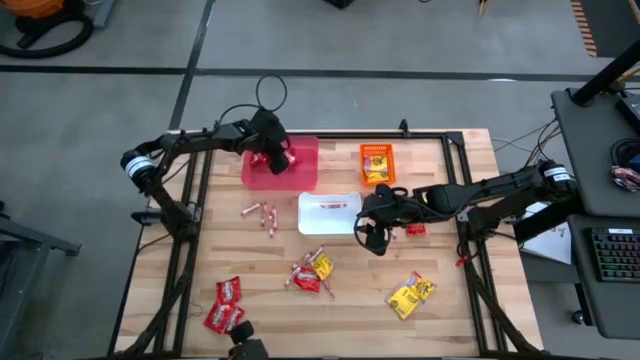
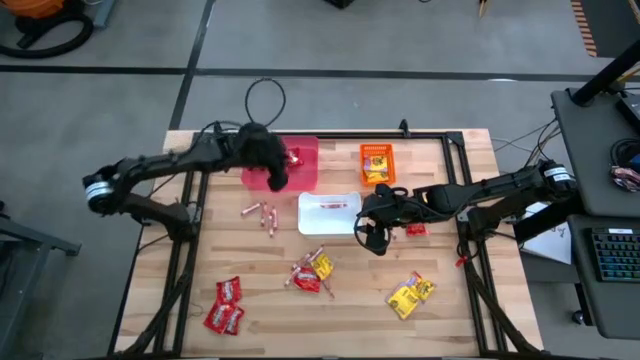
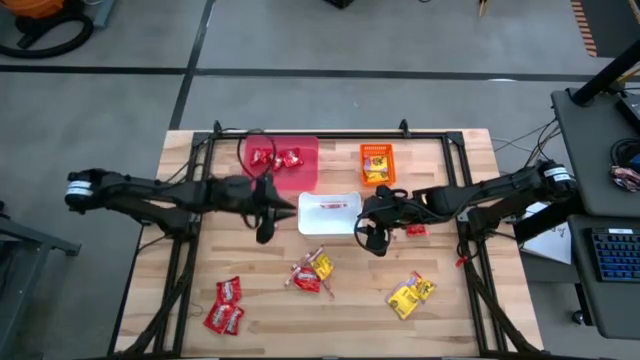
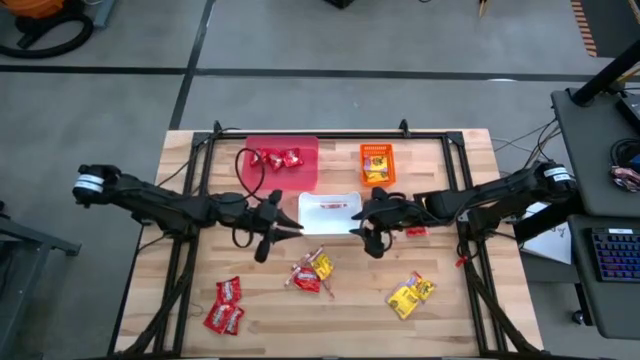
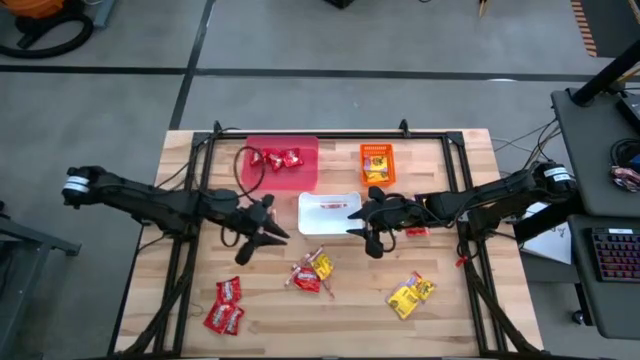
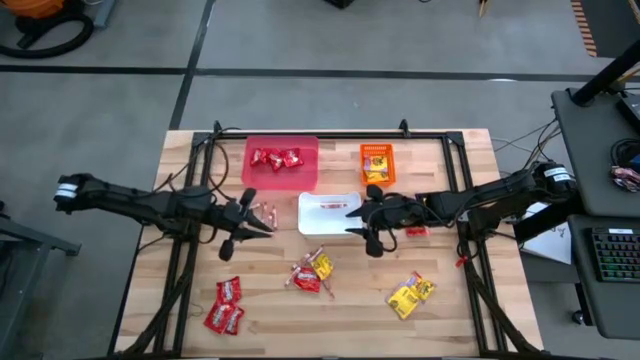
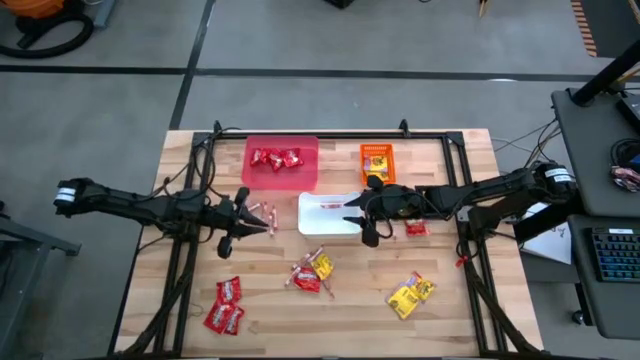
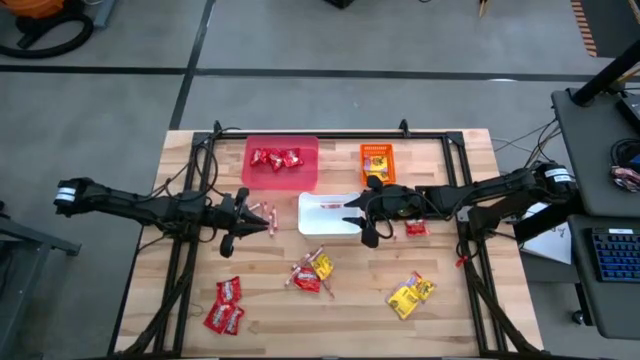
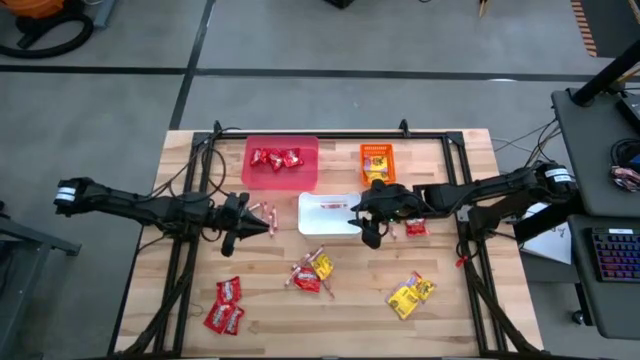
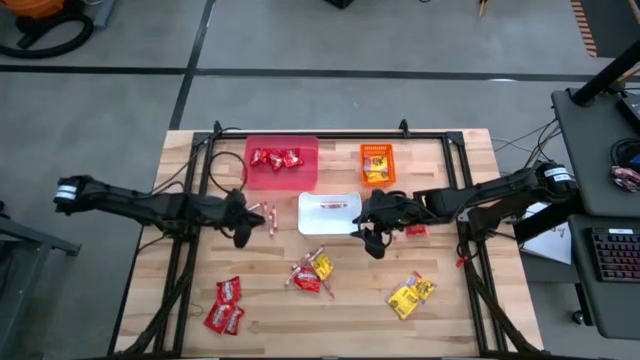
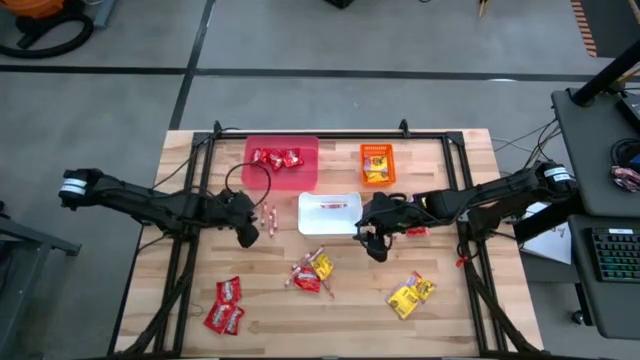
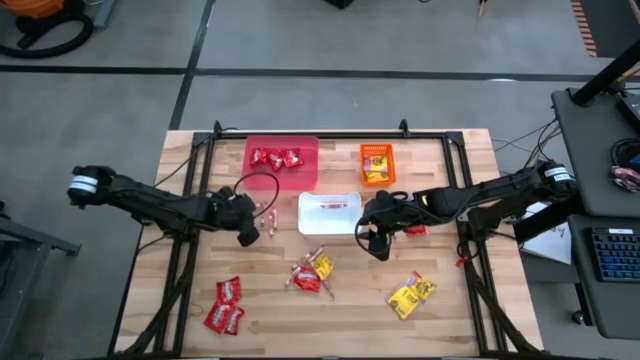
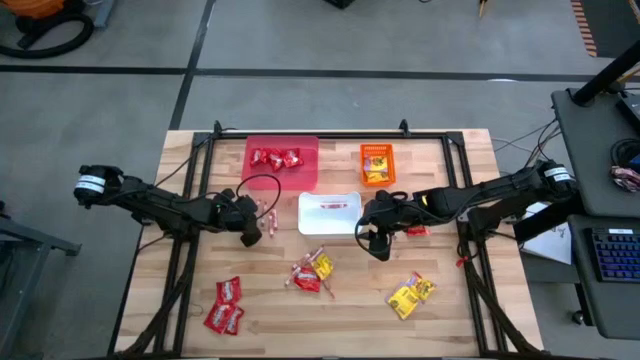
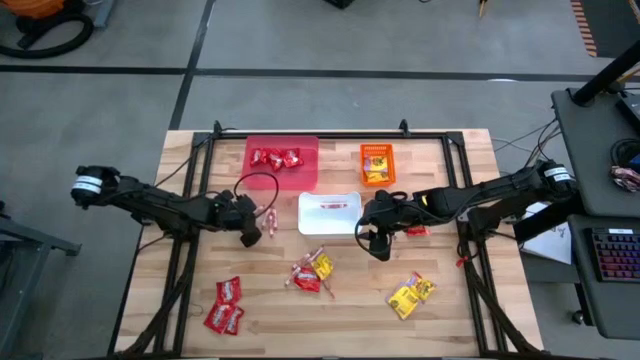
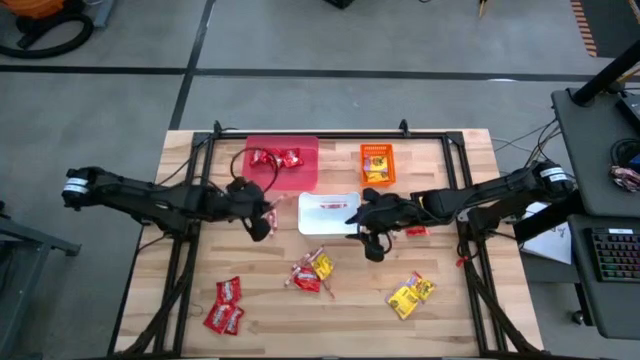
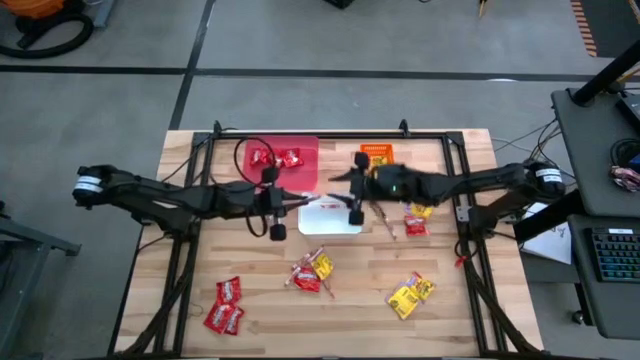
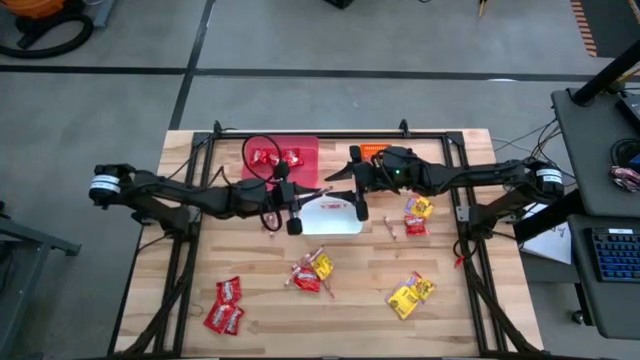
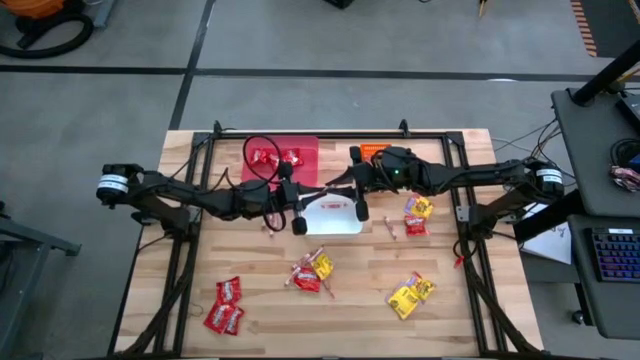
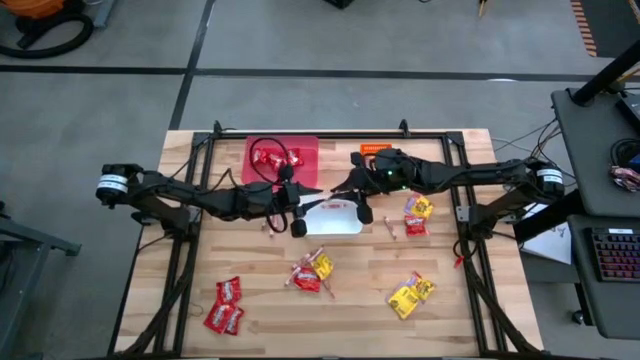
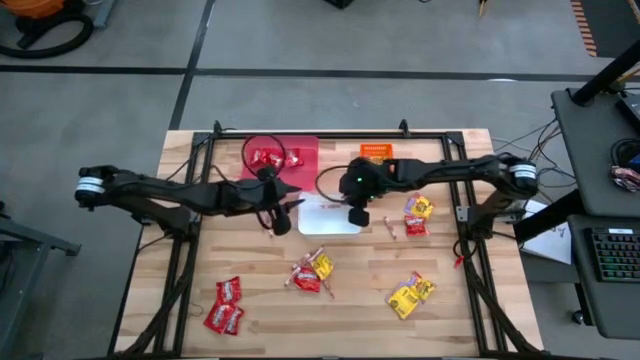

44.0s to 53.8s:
Task: Sort candy
Put the white candy into the white bin

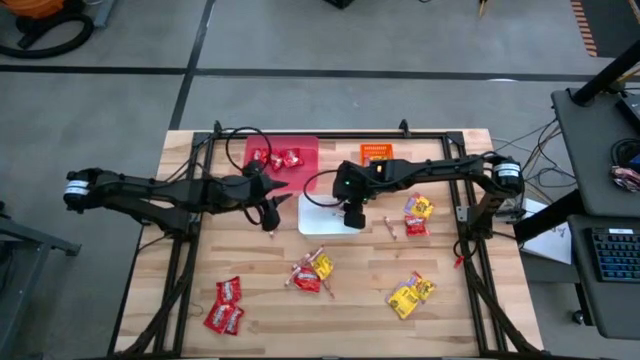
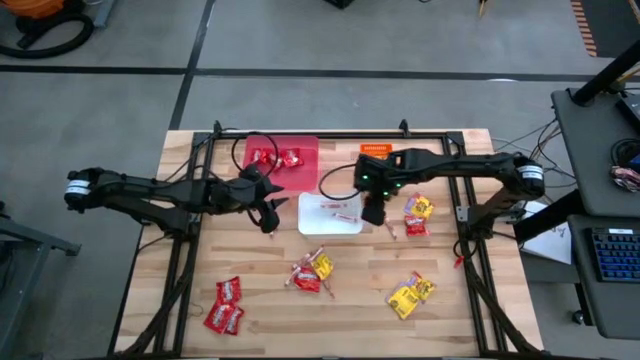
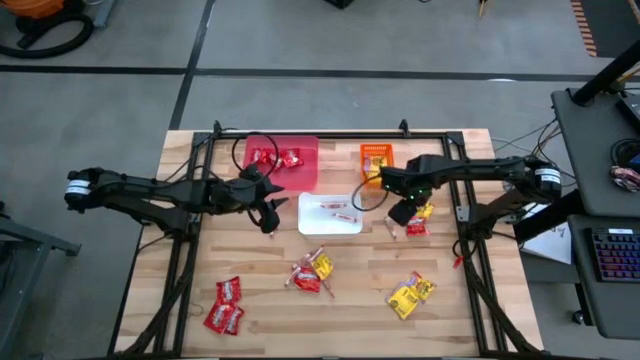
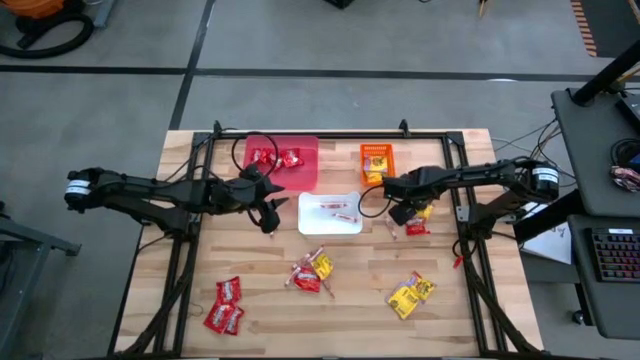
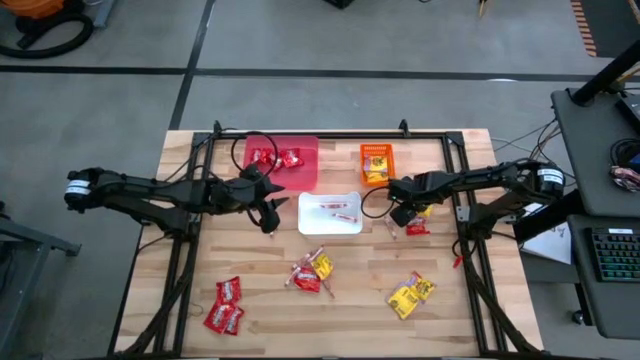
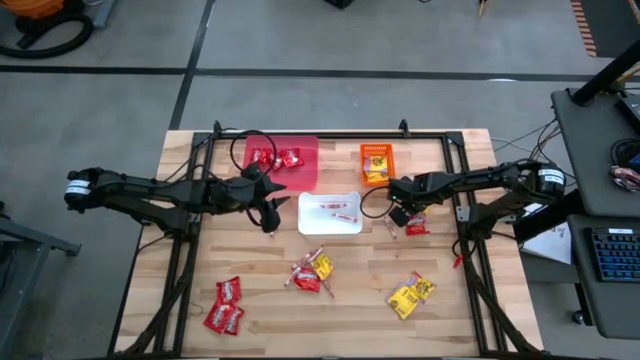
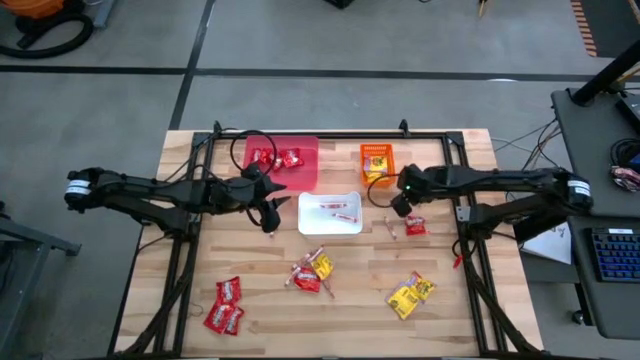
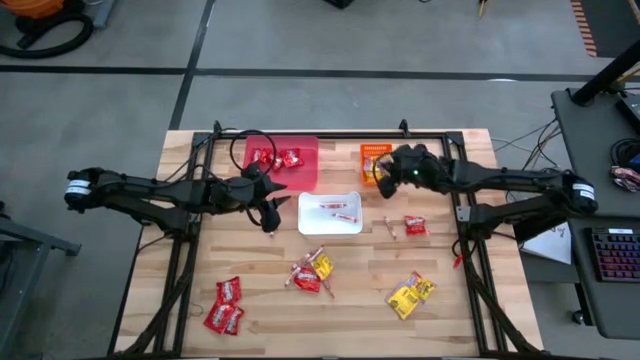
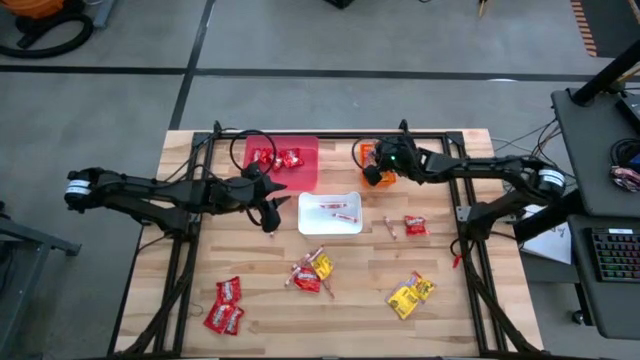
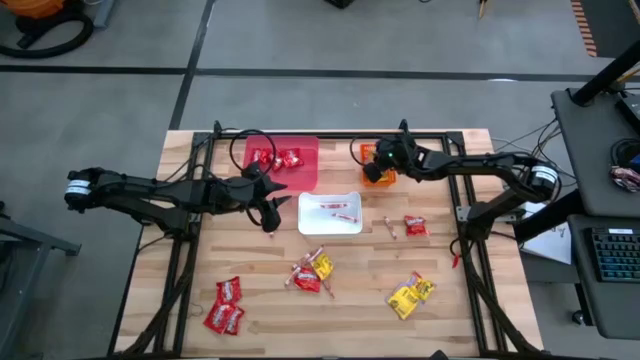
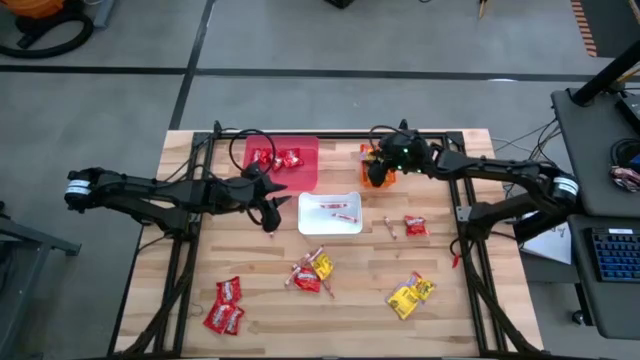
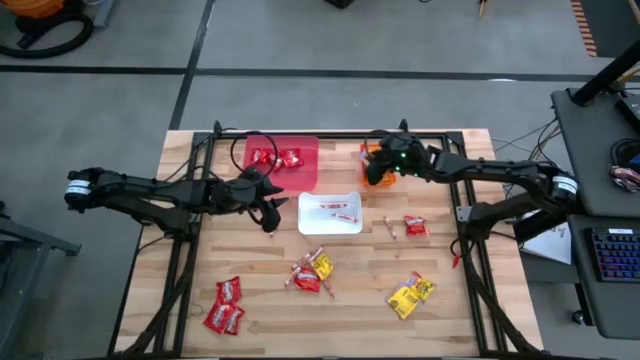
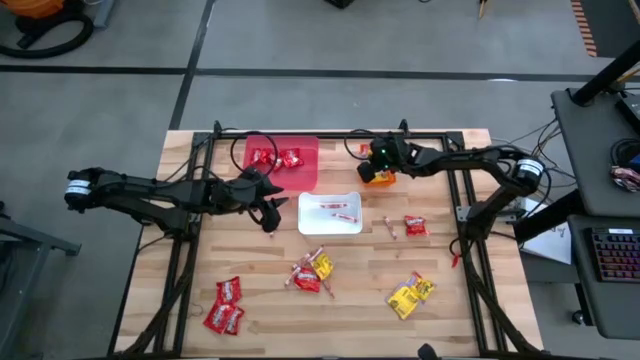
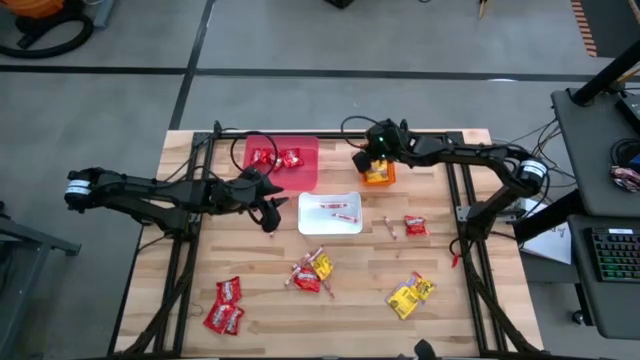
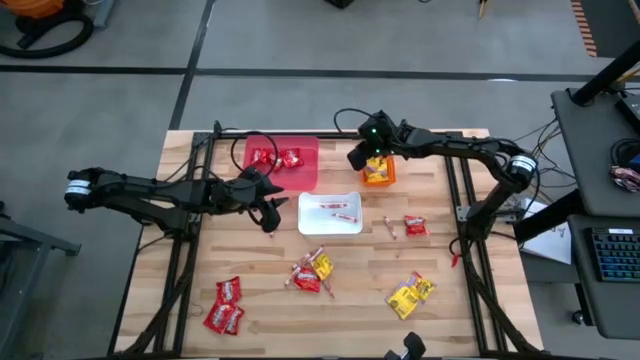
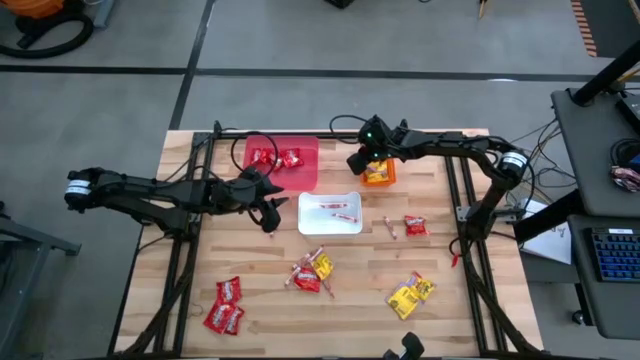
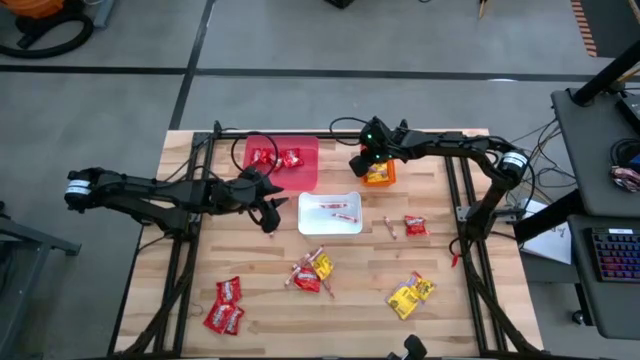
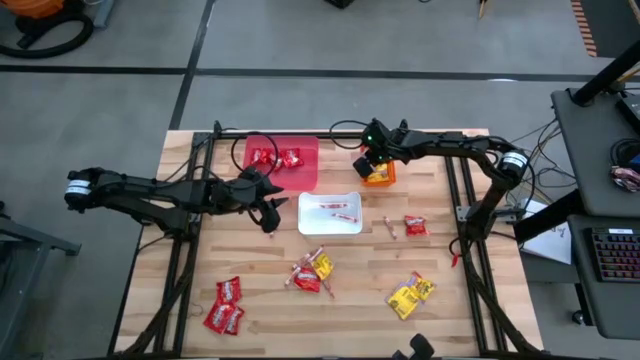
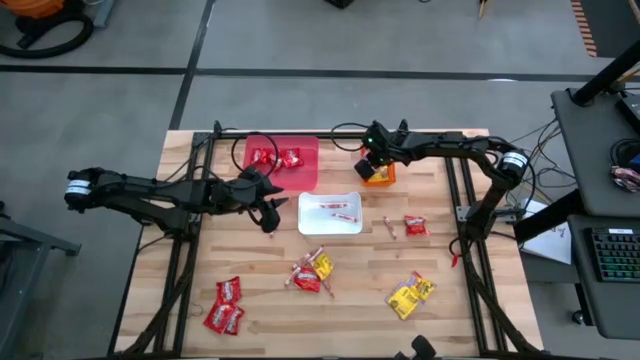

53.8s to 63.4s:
Put the yellow candy into the orange bin
